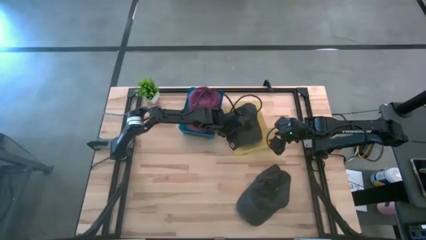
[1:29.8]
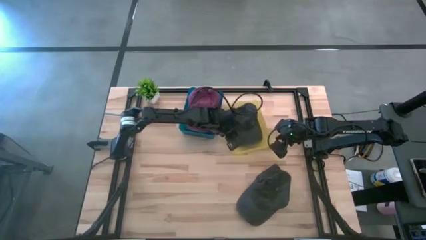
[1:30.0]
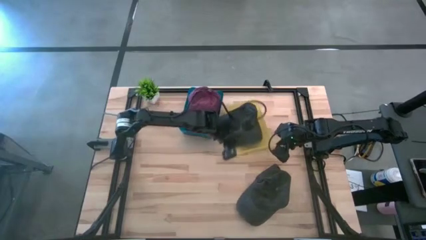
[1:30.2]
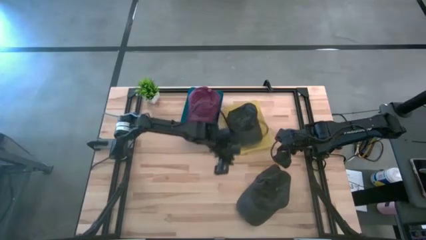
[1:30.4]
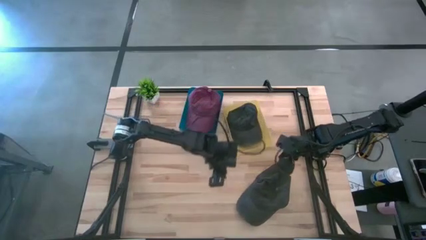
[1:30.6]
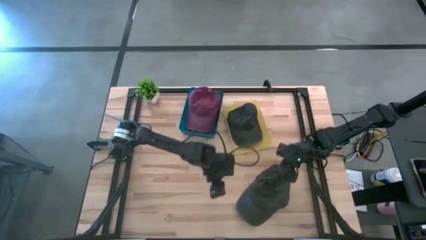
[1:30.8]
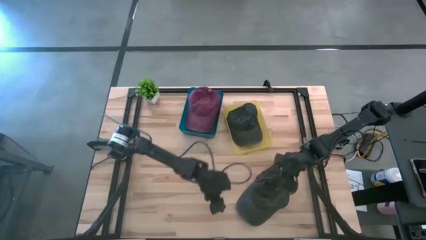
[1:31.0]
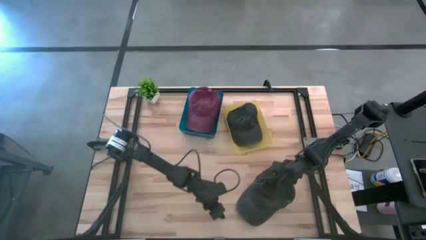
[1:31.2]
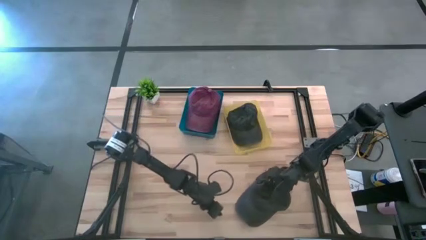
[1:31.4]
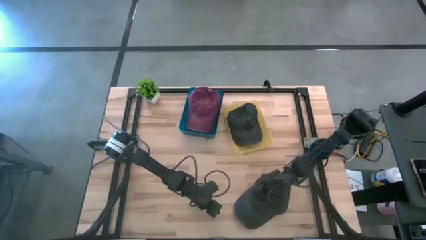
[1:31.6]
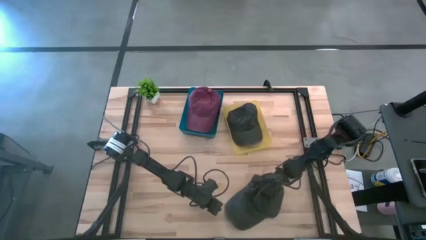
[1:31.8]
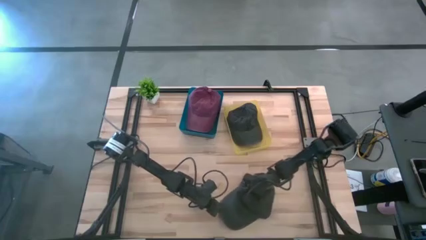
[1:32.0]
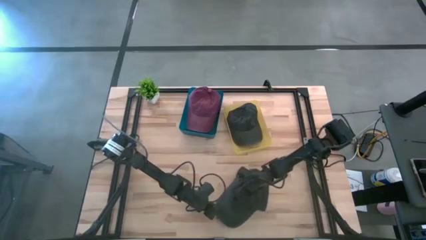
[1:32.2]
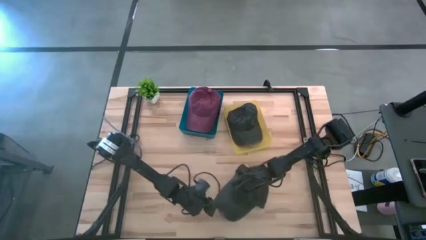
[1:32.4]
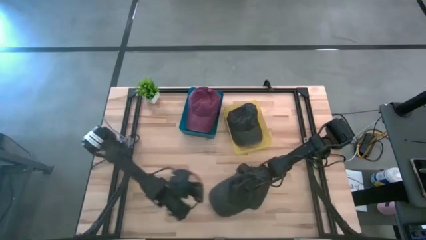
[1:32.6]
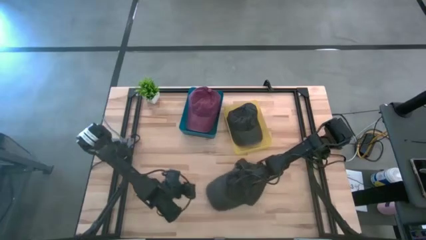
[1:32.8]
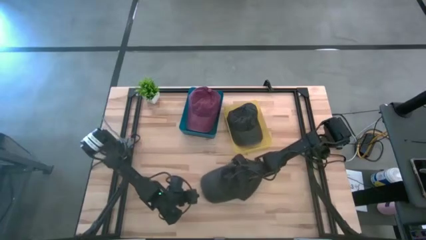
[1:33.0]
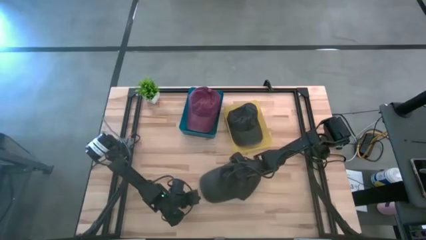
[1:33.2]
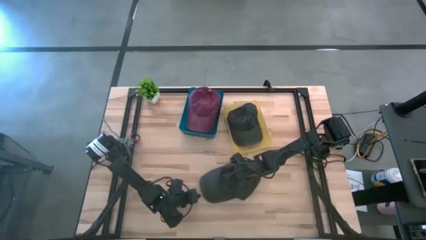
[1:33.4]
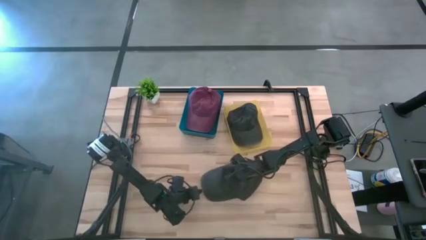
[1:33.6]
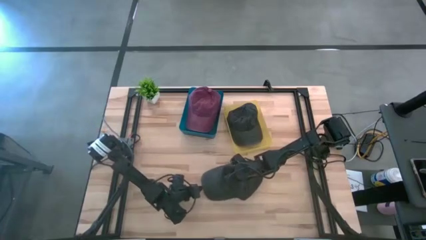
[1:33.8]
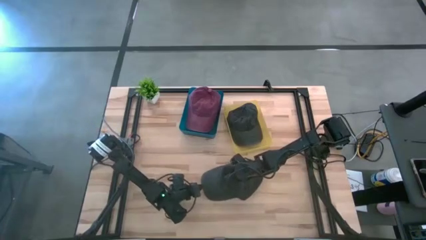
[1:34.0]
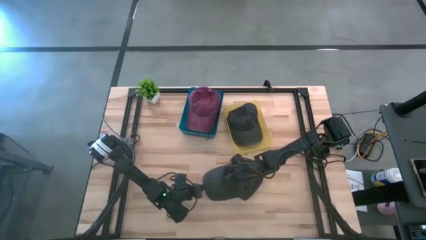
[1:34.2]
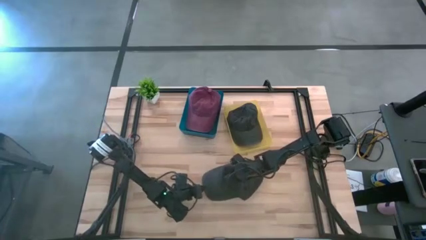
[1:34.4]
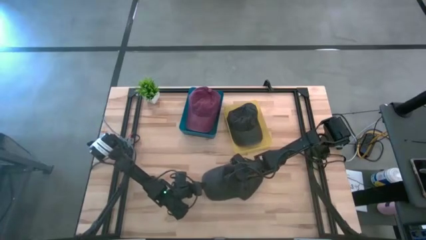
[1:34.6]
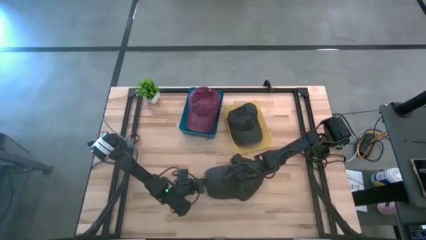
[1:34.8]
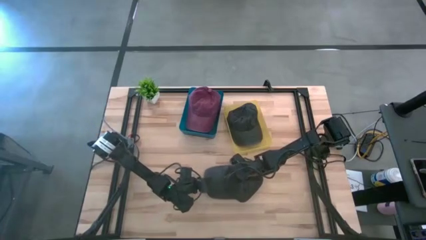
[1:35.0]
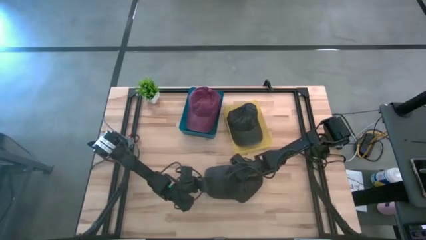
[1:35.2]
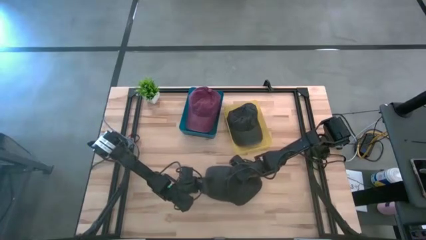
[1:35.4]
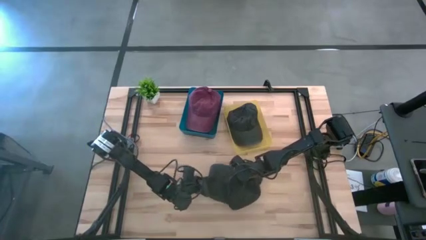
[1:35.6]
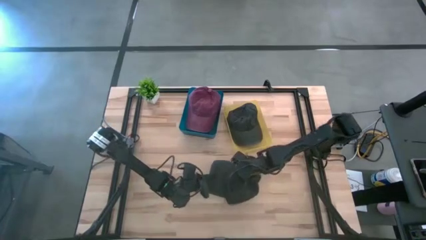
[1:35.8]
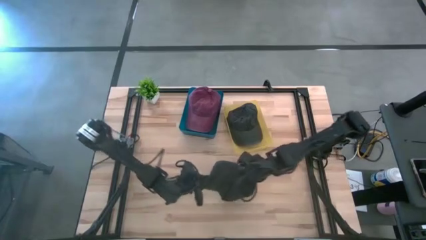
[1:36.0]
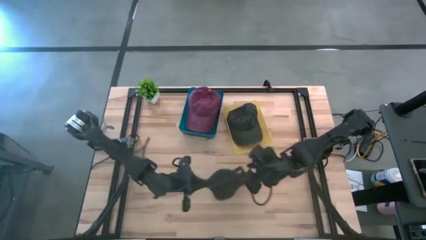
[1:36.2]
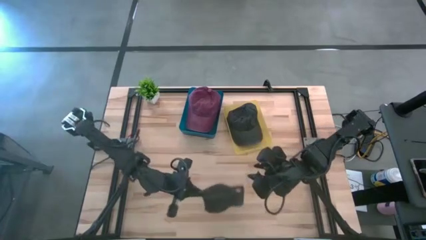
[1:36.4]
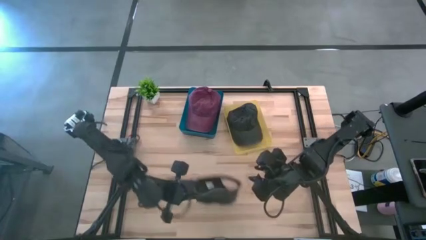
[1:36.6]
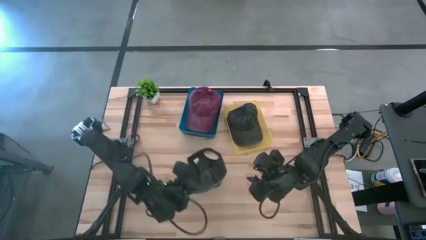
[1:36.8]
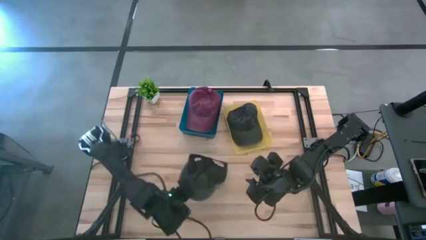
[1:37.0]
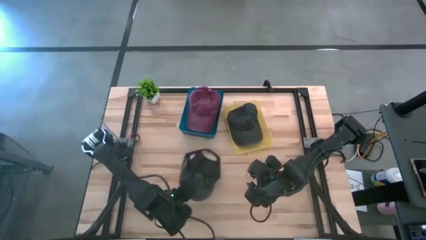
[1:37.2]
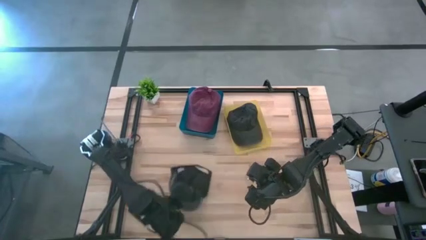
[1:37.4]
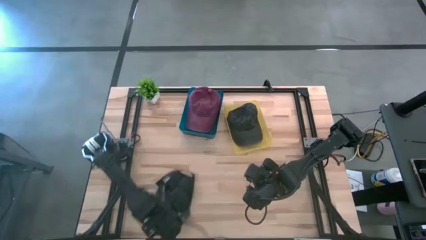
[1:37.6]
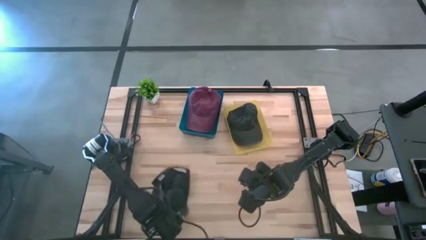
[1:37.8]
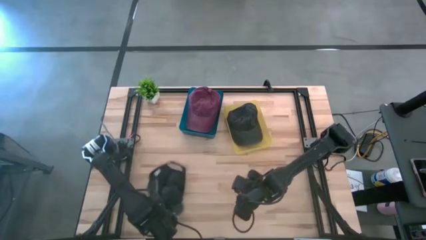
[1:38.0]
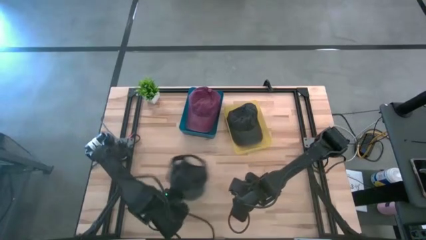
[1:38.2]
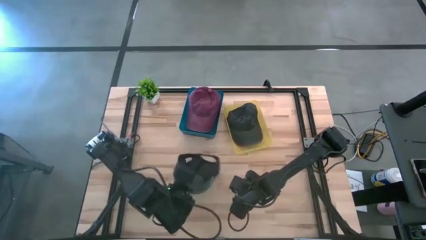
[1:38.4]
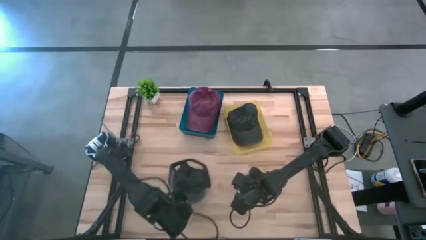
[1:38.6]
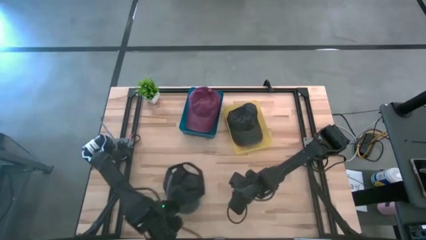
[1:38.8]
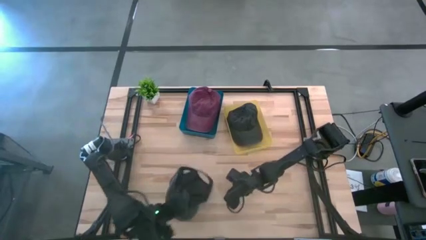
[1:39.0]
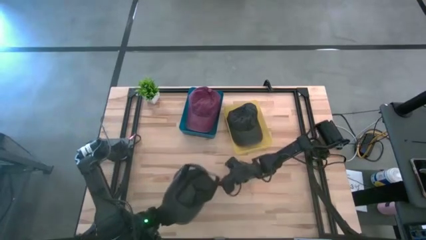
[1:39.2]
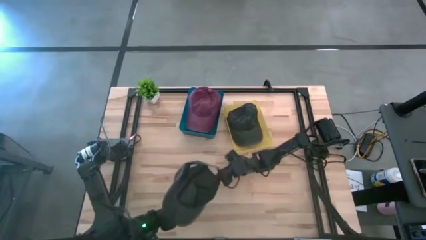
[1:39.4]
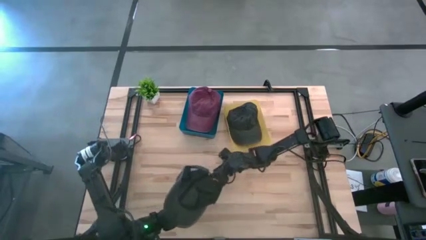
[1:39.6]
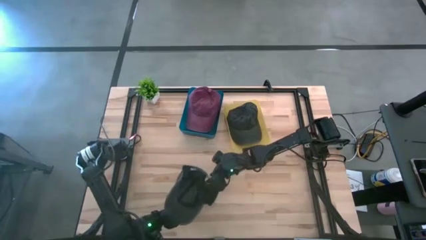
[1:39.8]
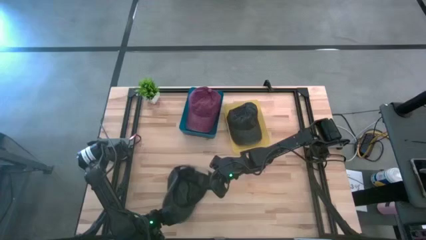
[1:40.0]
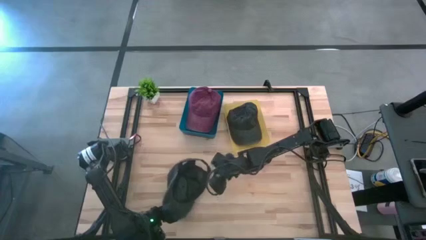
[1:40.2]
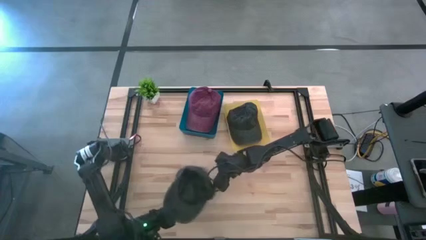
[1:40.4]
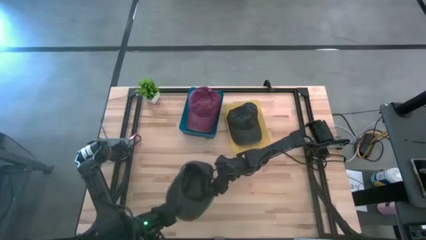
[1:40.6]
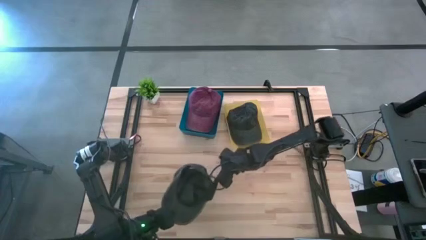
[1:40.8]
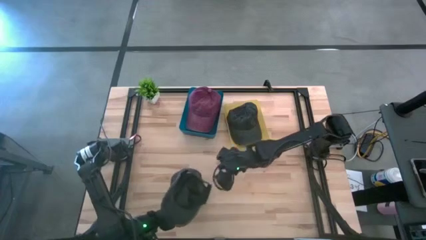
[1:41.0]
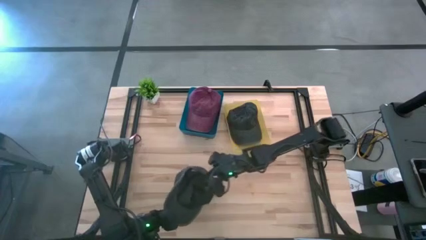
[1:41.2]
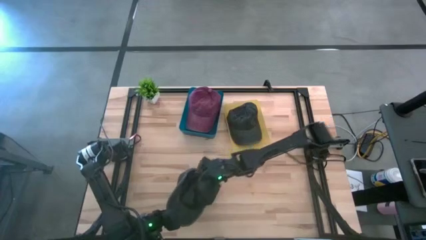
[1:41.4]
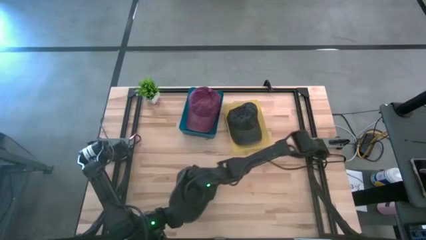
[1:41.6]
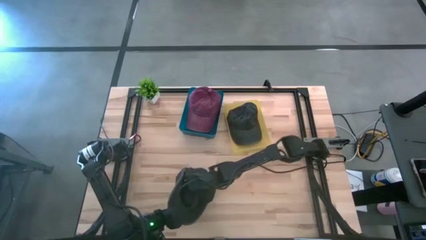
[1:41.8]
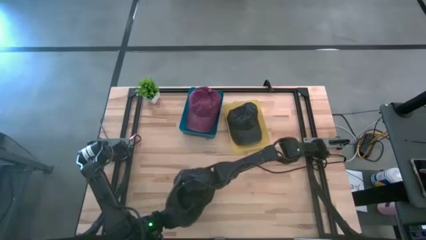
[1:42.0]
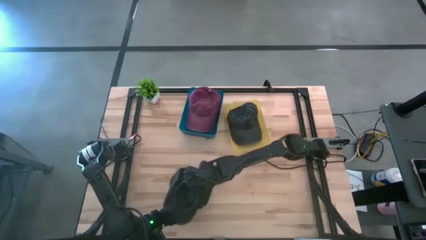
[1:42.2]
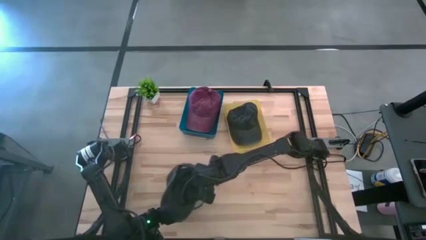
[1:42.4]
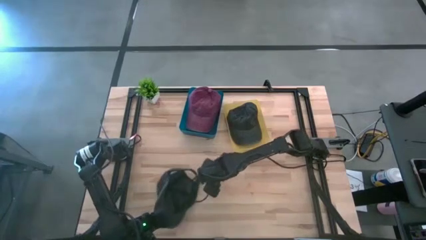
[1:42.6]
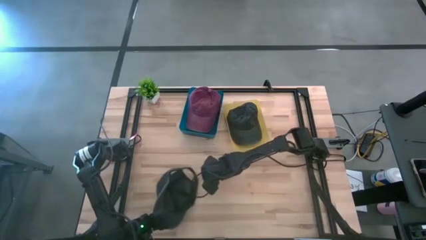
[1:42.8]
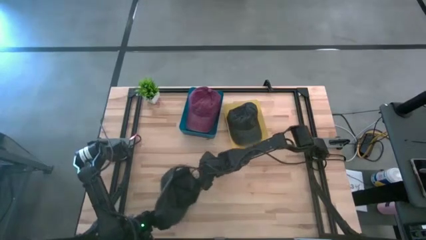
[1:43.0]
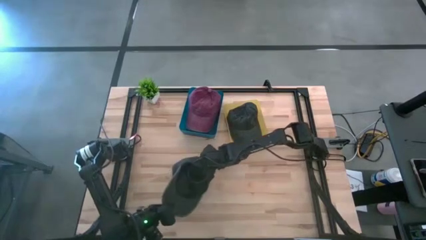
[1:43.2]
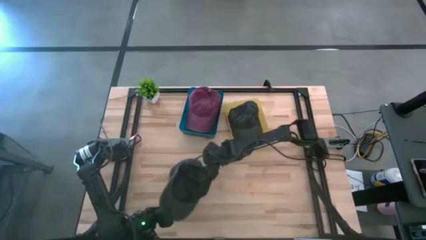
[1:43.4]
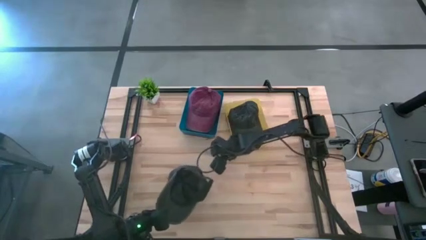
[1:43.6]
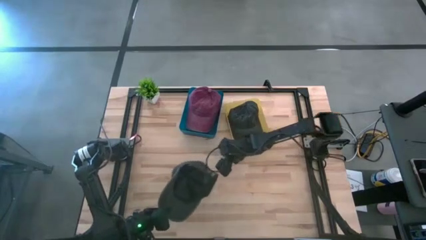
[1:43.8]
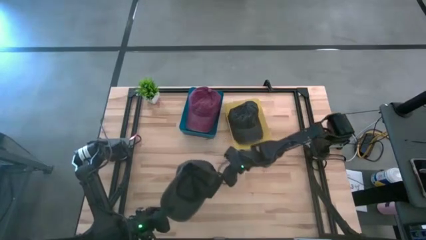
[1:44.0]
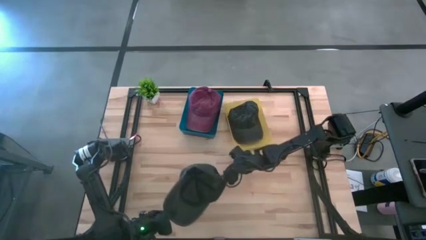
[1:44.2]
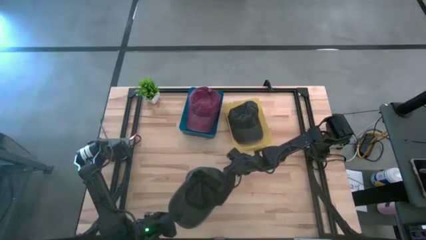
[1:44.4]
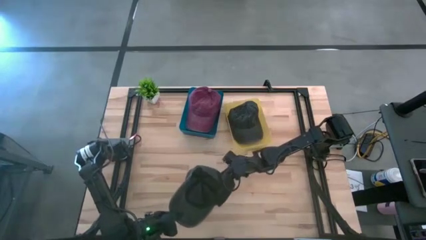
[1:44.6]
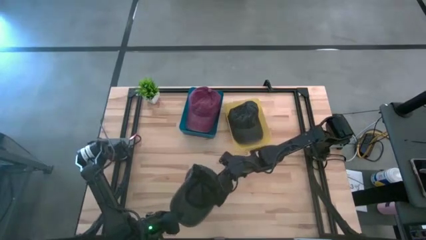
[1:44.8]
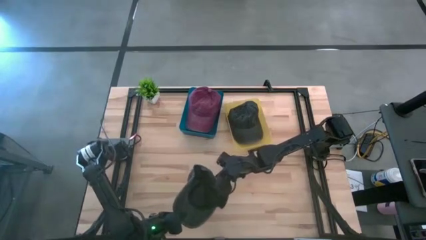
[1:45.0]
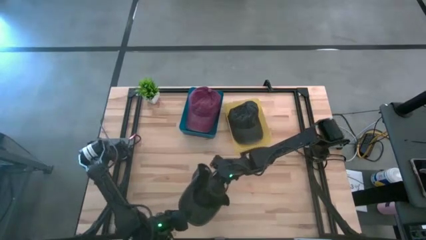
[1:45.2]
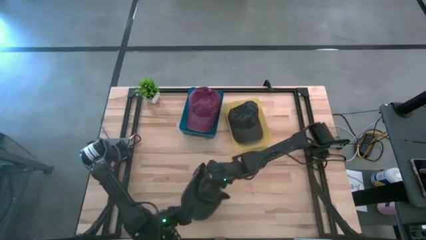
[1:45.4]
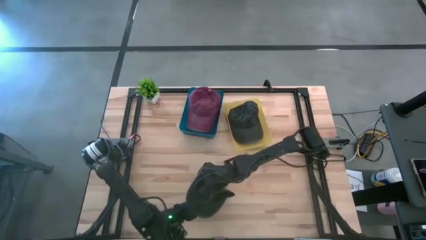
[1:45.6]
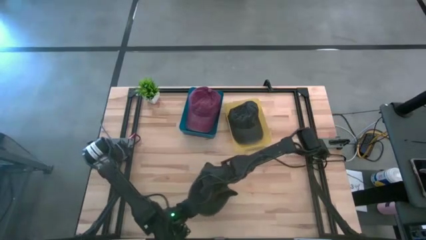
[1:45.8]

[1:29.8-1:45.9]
Task: Pick & Place hat
Put the black cap into the yellow bin
